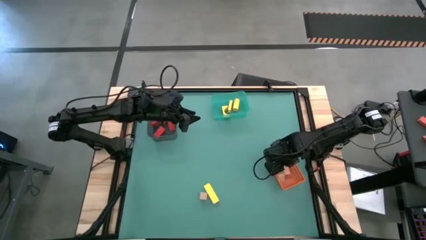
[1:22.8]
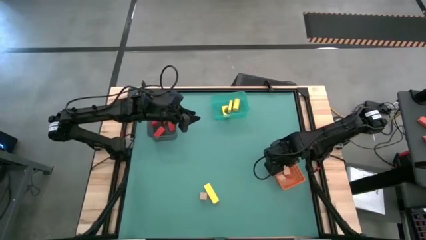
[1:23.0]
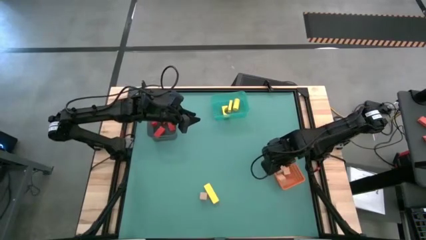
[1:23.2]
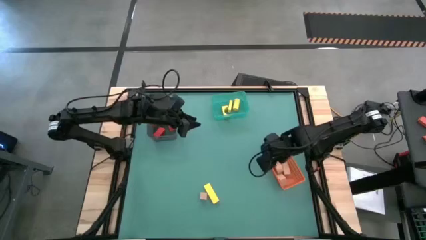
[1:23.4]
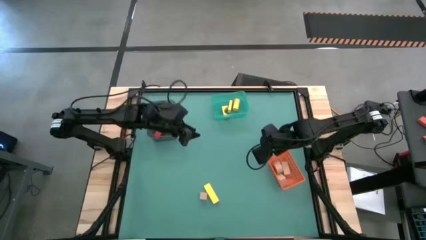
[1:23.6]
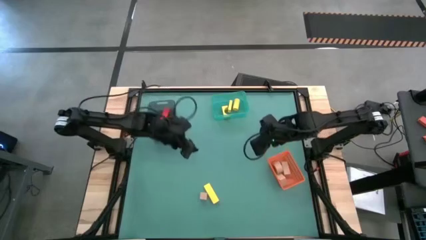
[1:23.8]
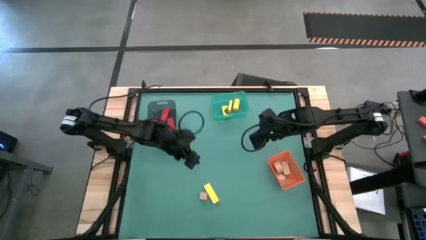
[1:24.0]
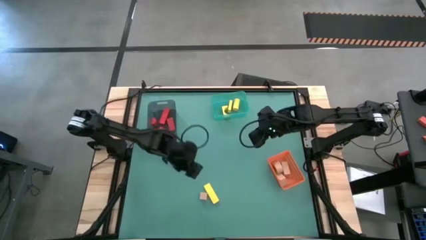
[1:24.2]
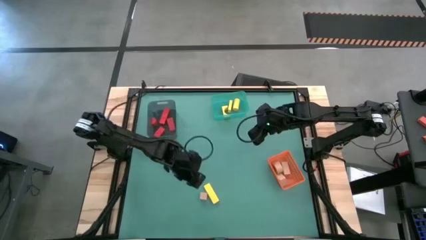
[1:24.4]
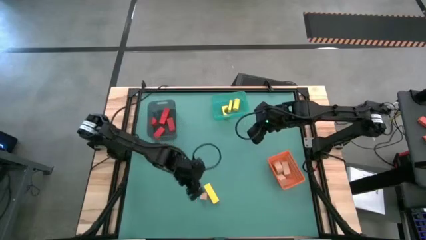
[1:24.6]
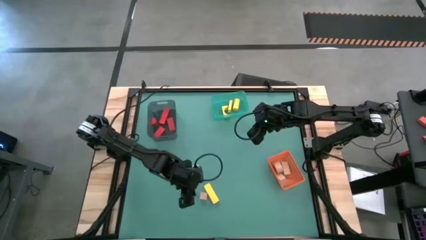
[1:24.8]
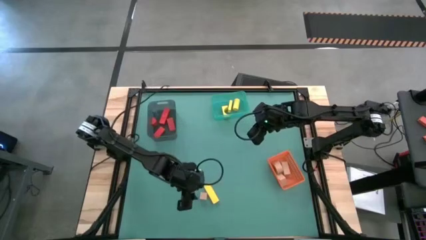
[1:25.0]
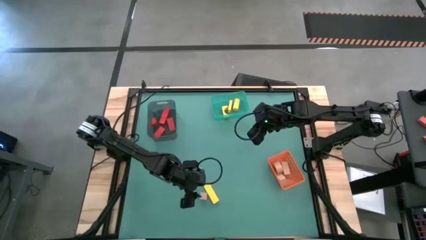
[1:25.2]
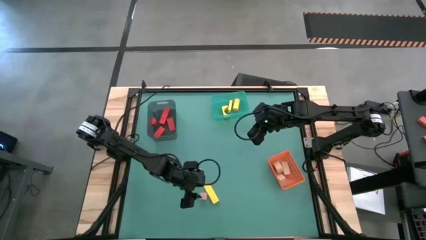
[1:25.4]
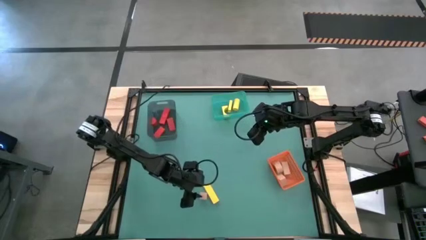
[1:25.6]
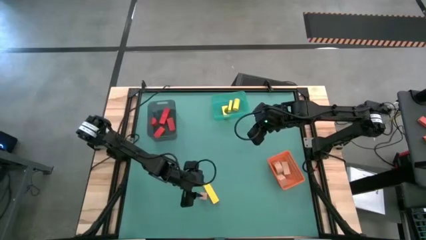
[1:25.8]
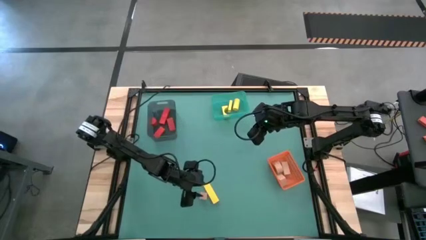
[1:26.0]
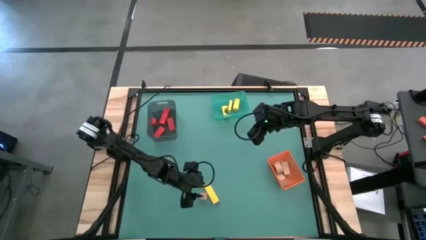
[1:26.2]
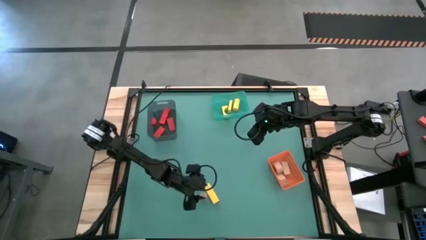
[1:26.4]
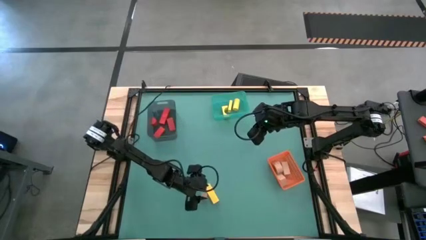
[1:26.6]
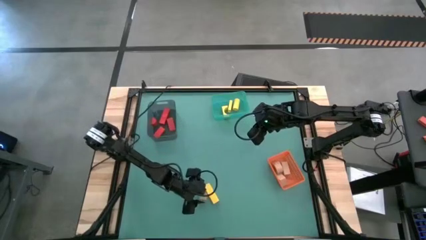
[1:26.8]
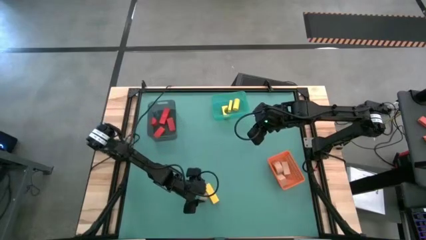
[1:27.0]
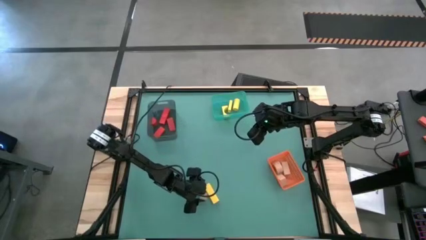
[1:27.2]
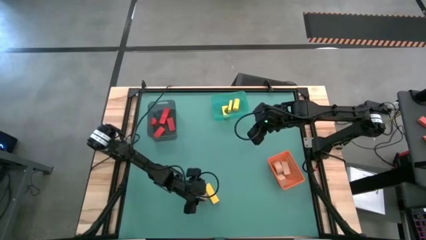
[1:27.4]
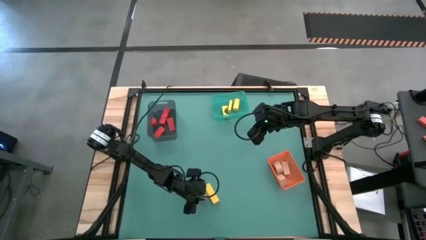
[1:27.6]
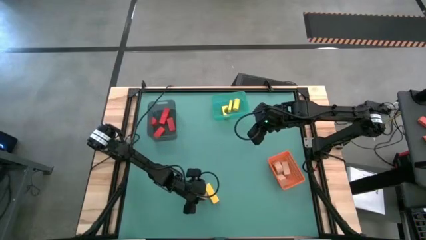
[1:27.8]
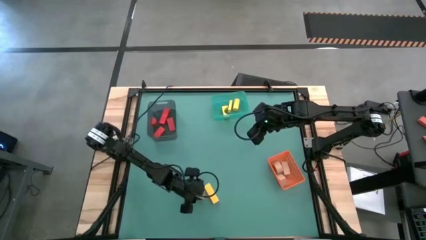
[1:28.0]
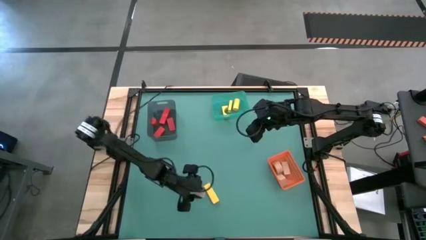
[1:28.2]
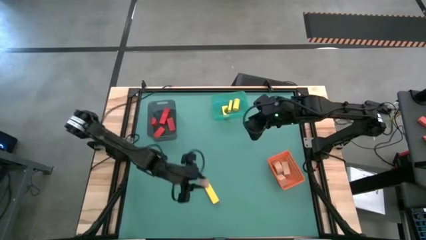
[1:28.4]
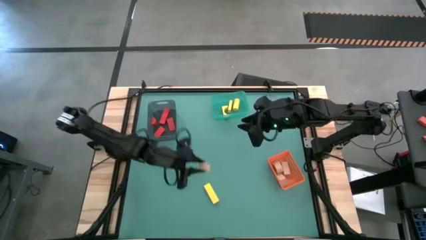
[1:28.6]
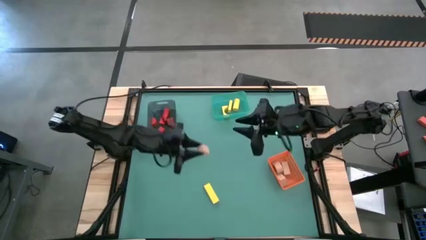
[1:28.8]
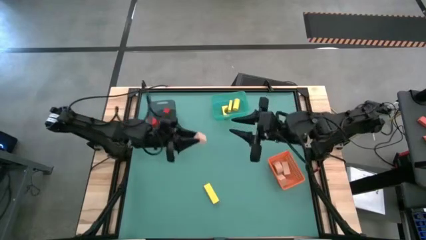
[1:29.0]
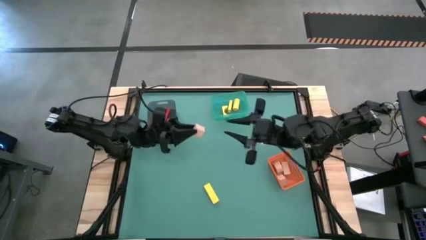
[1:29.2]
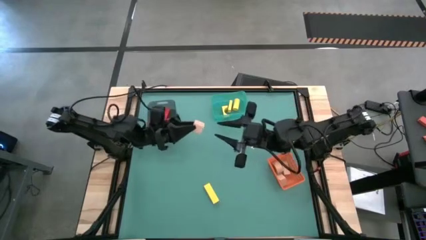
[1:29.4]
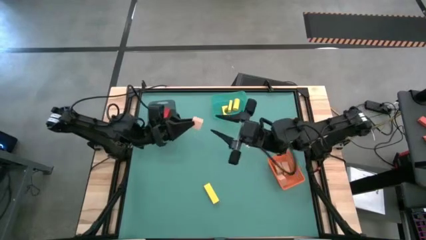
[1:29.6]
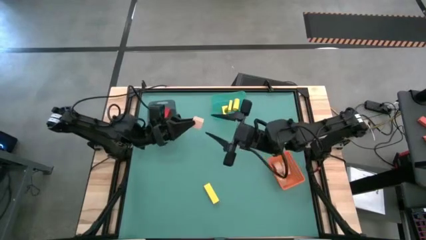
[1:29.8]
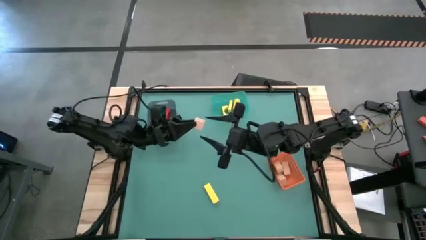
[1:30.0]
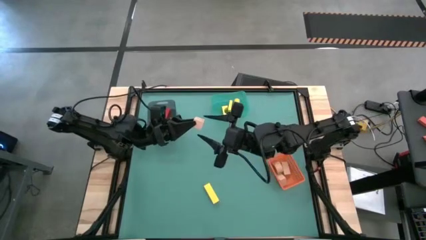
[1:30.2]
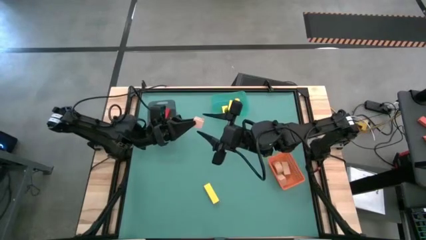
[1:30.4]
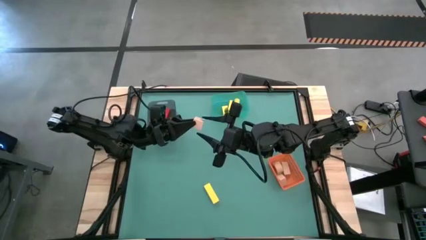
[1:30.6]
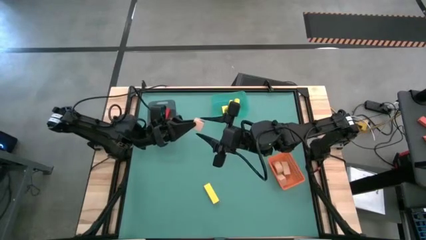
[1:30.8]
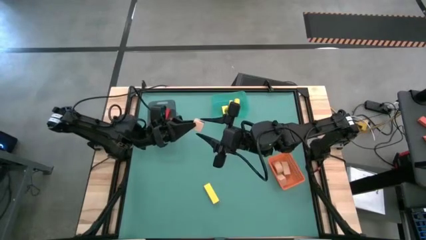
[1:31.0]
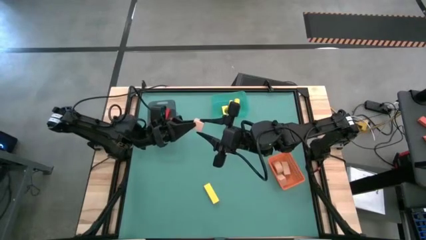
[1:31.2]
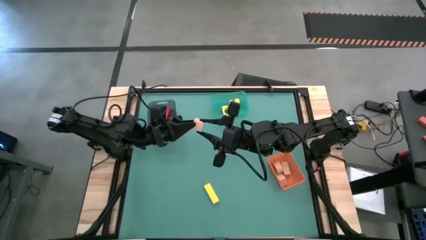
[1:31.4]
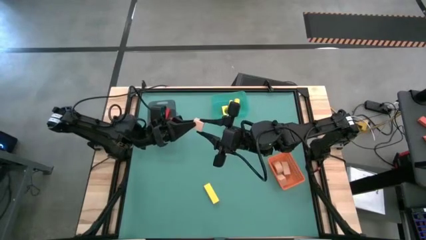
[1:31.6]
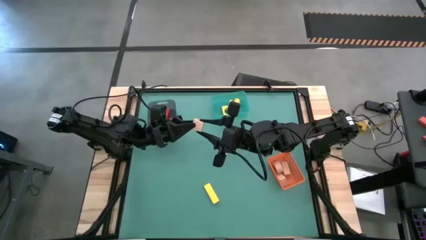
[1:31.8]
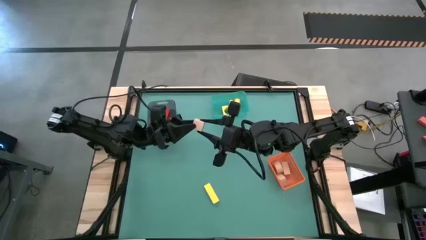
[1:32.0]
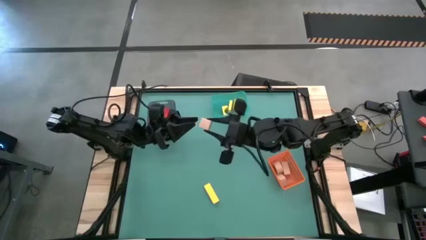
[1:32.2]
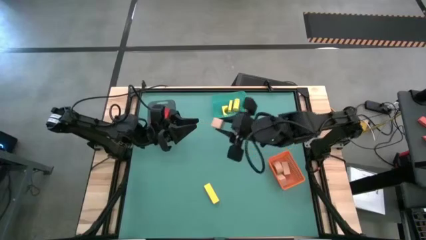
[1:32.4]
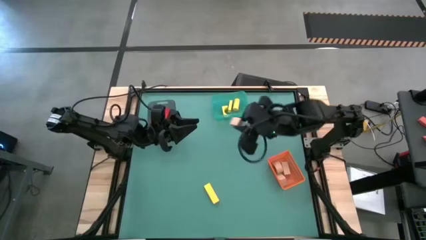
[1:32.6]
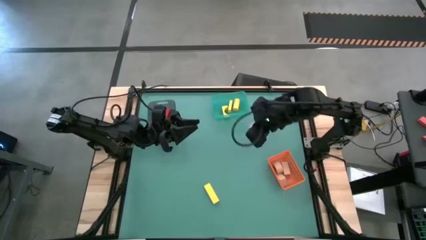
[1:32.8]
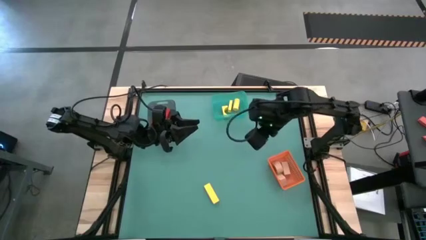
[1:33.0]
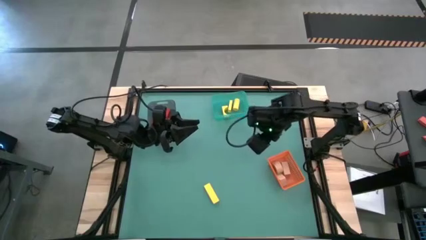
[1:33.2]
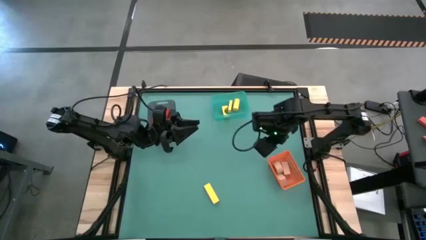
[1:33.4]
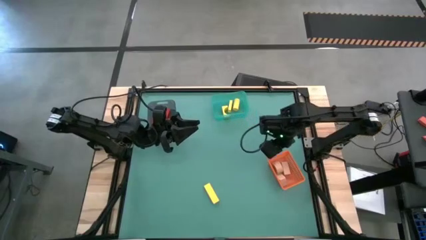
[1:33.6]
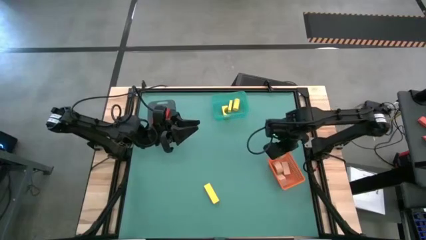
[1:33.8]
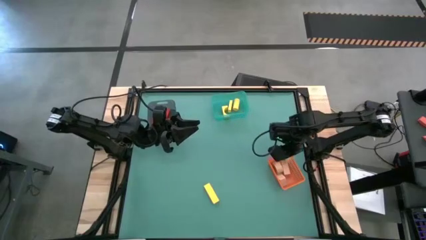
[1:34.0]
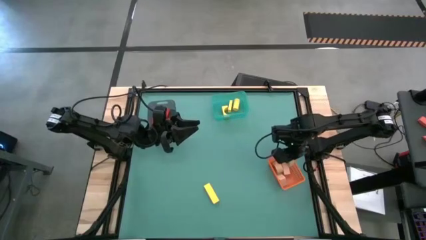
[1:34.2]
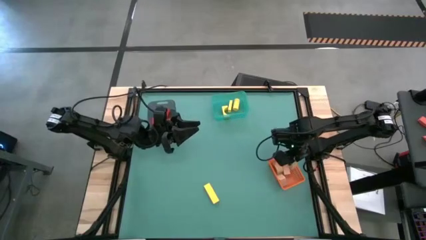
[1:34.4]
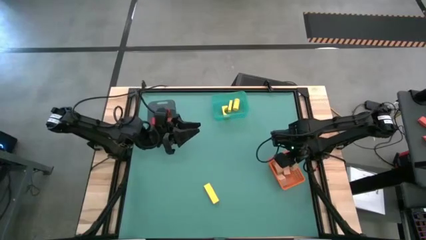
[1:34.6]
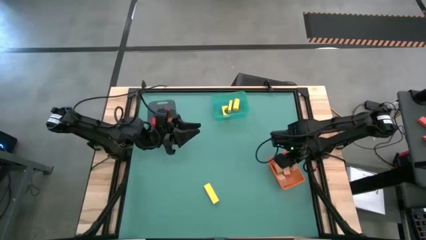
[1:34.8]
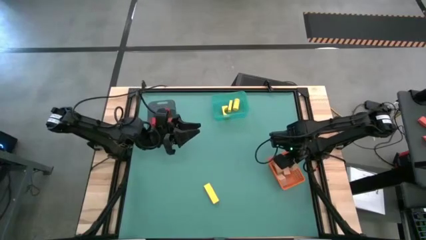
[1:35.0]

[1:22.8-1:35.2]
Task: Sort & place blocks by color
Put the light brown block into the orange bin
